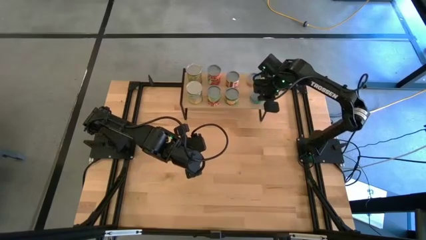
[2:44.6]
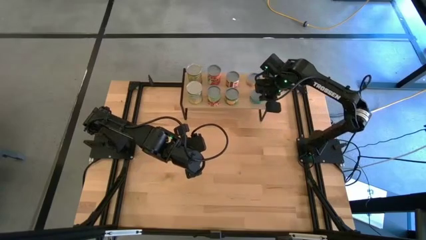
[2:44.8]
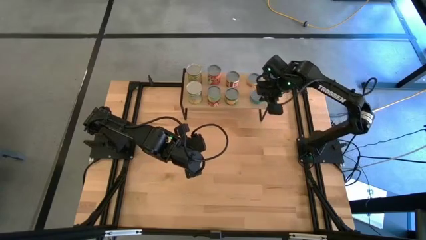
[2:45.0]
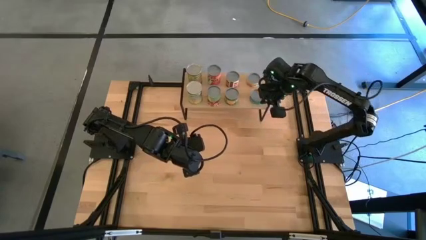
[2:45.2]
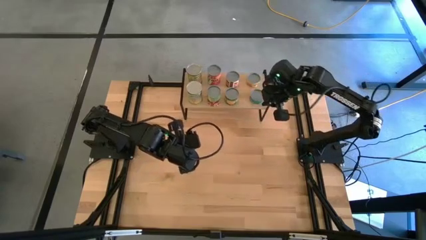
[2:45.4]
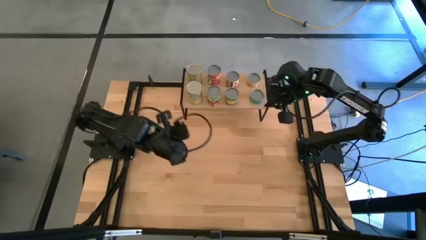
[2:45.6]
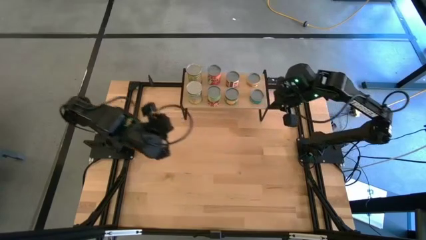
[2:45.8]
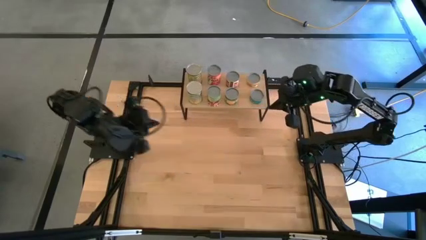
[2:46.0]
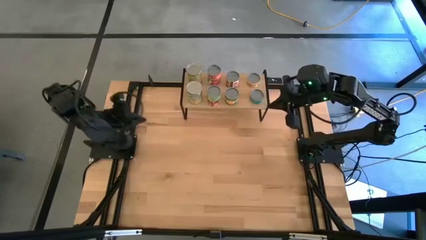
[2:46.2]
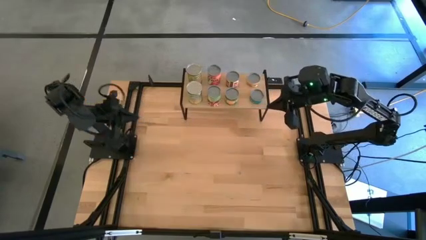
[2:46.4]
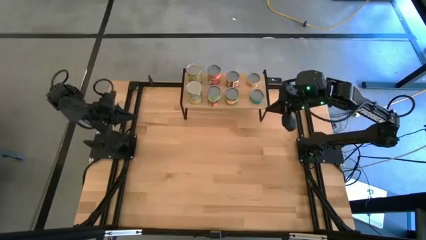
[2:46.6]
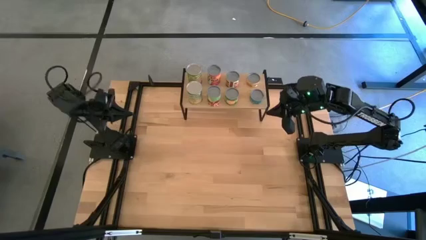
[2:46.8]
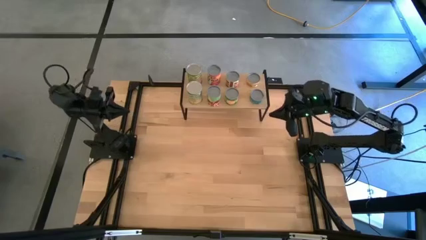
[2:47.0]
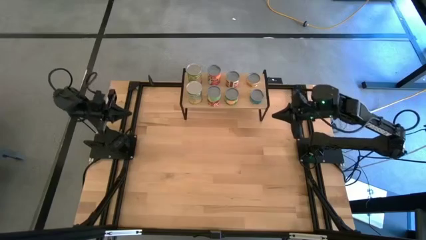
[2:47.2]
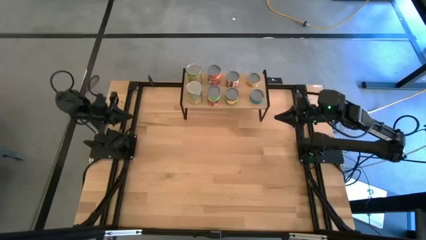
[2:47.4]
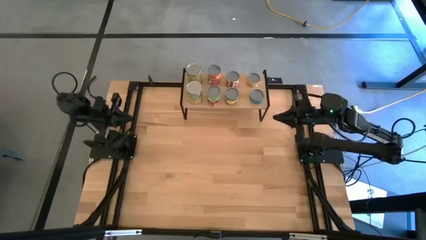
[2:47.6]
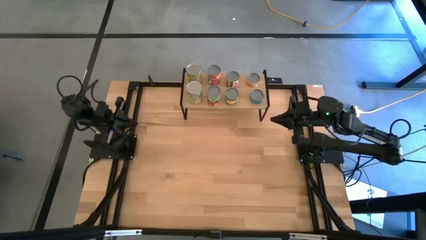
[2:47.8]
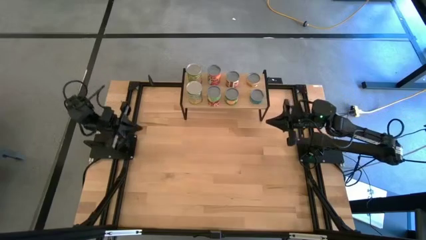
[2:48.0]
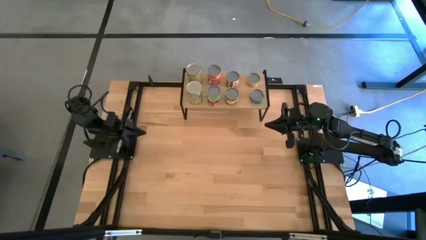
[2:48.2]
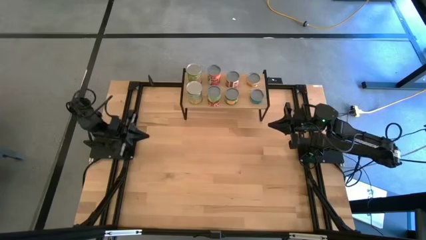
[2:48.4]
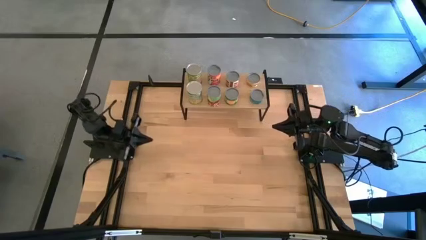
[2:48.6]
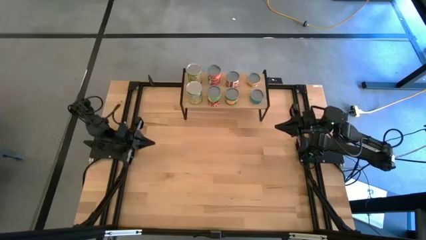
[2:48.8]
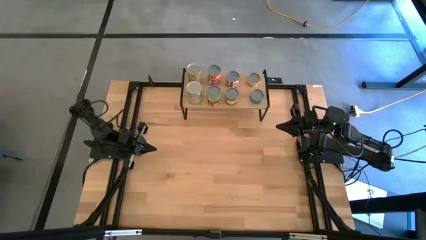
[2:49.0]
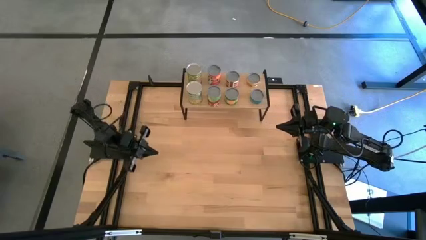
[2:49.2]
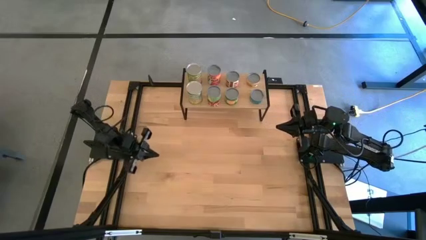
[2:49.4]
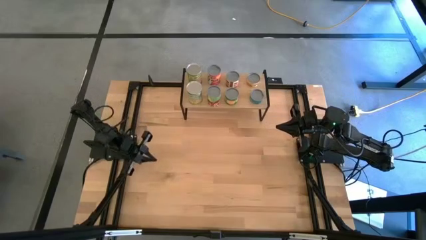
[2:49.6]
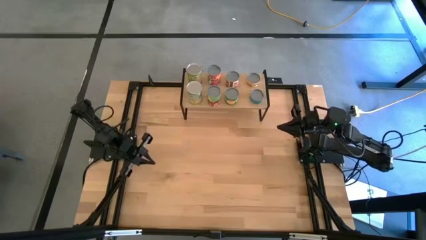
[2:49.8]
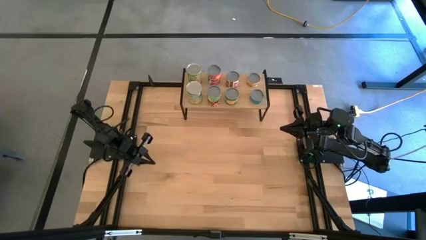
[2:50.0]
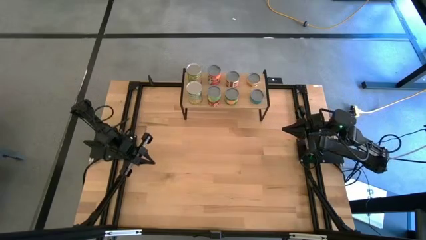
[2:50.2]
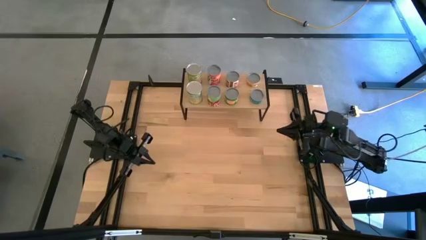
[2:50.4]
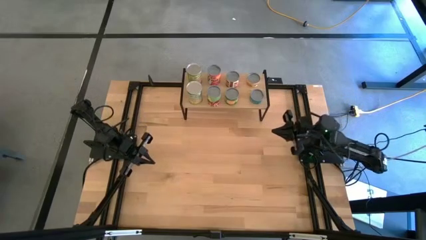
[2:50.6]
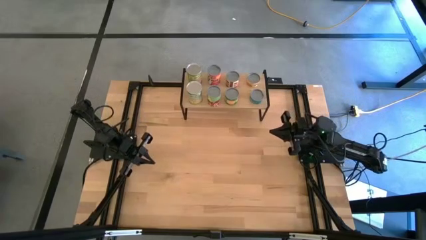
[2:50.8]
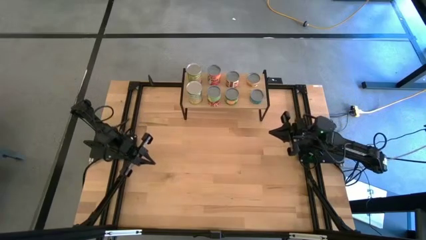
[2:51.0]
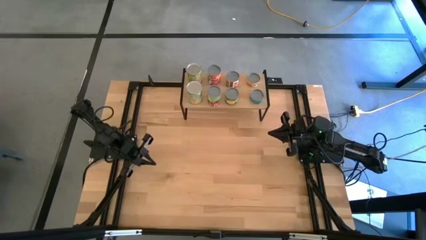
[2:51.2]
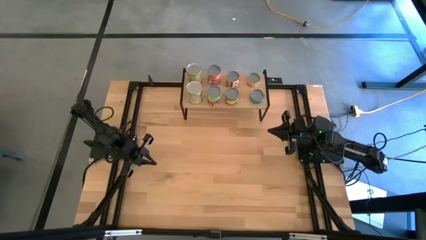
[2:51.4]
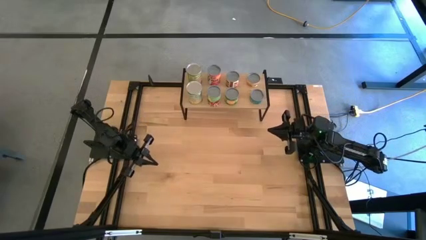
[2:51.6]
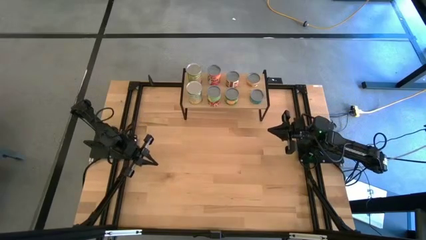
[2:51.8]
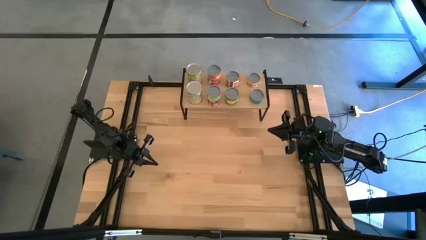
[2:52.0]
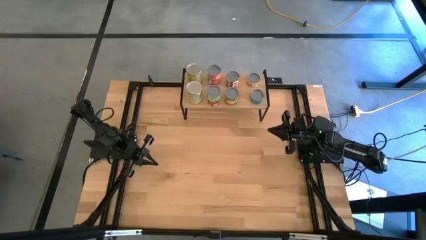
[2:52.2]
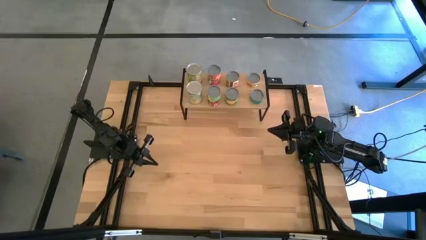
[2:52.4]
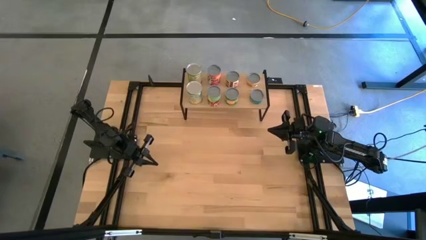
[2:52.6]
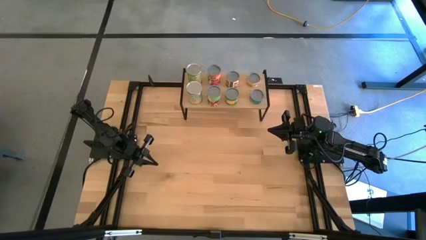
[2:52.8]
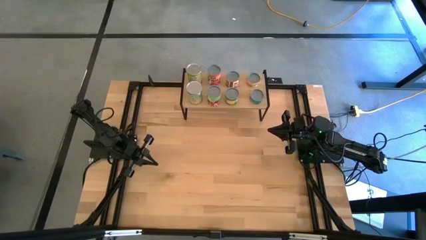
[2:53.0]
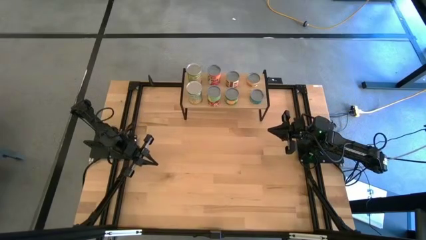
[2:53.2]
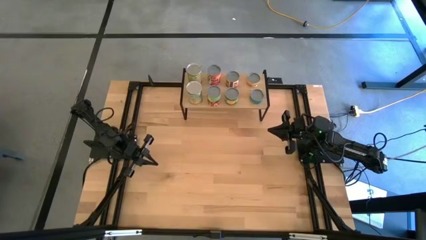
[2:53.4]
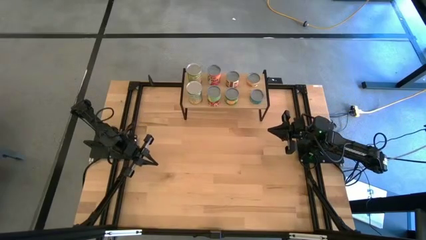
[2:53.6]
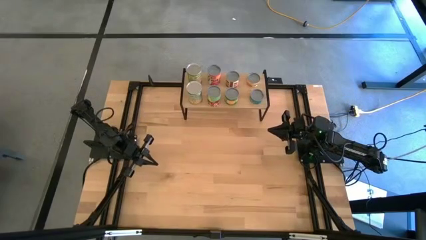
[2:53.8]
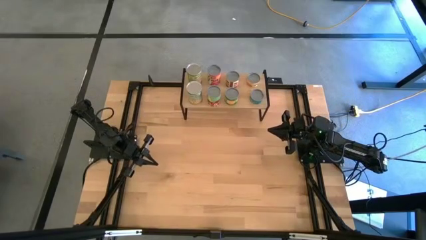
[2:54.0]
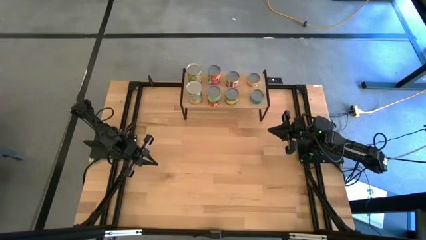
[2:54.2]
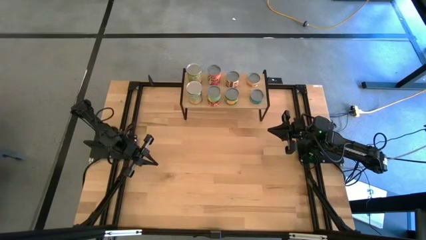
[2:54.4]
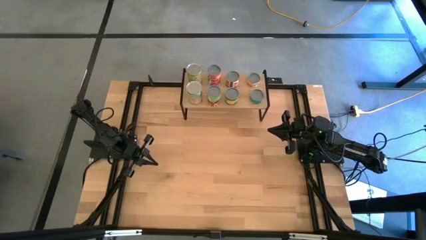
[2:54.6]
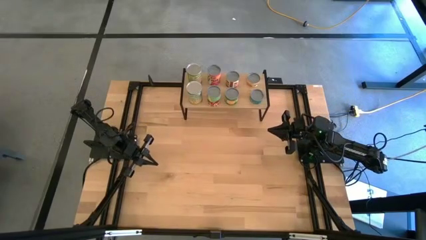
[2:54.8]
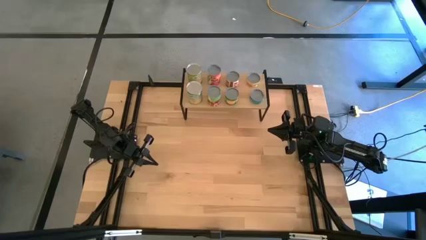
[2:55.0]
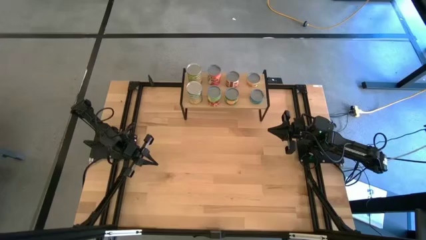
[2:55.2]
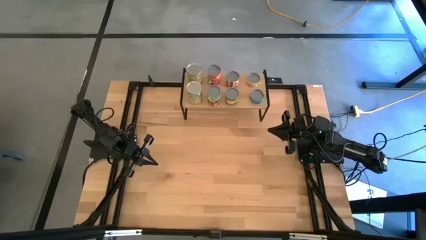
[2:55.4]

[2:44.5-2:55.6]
Task: Pick and place cans onto a shelf
Return to Home Position

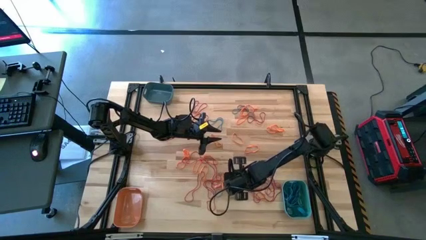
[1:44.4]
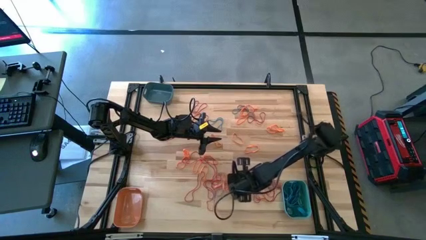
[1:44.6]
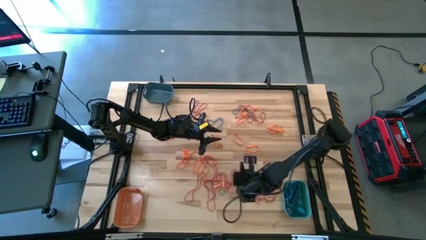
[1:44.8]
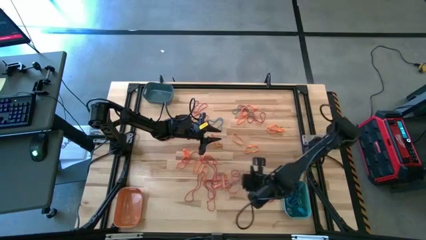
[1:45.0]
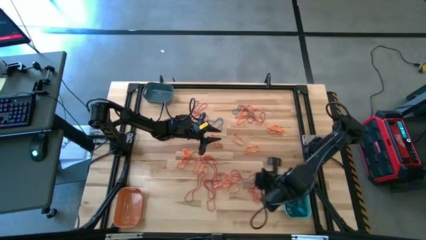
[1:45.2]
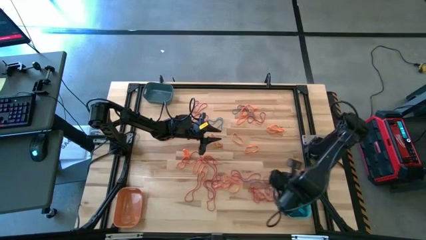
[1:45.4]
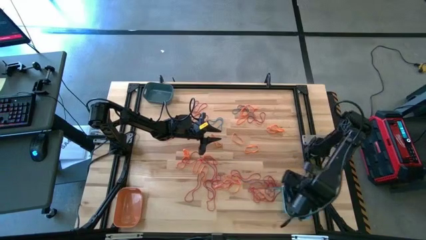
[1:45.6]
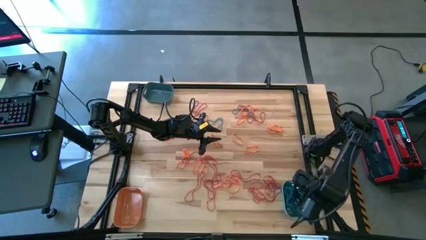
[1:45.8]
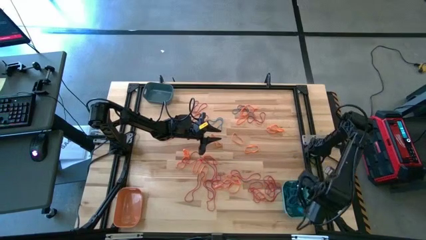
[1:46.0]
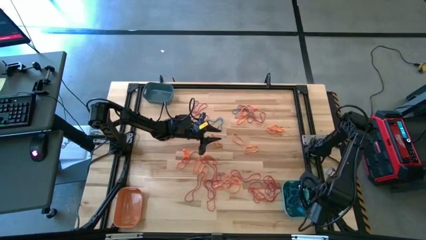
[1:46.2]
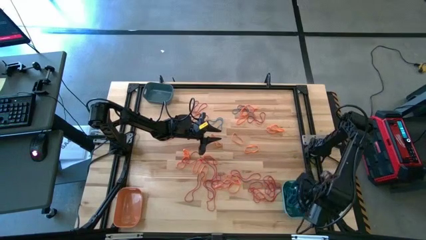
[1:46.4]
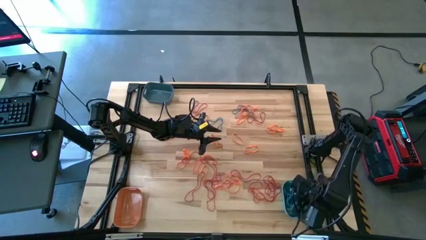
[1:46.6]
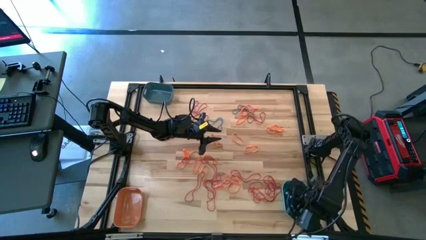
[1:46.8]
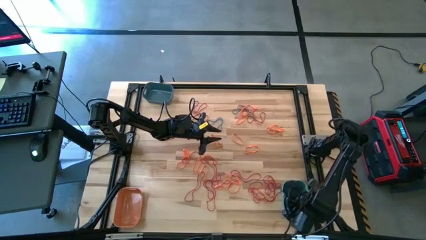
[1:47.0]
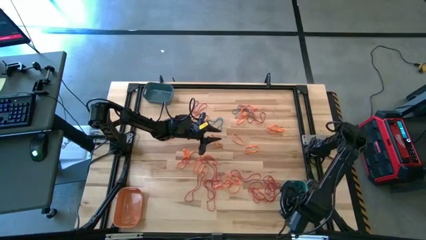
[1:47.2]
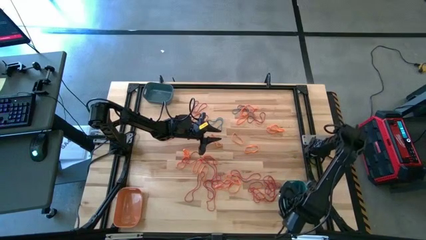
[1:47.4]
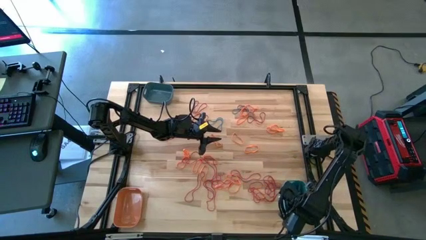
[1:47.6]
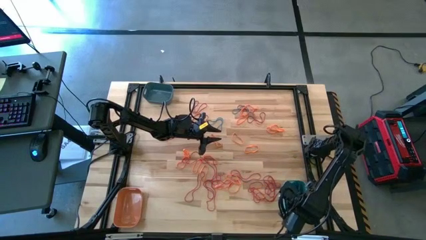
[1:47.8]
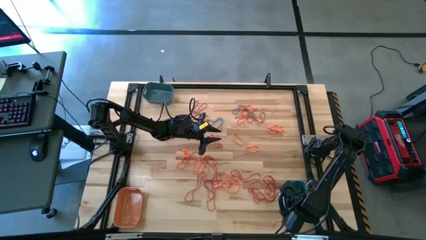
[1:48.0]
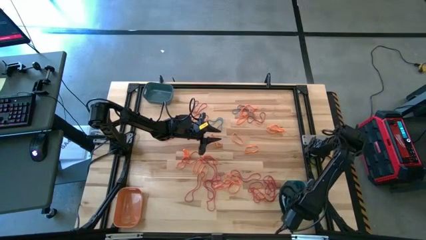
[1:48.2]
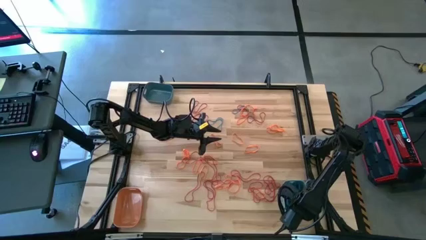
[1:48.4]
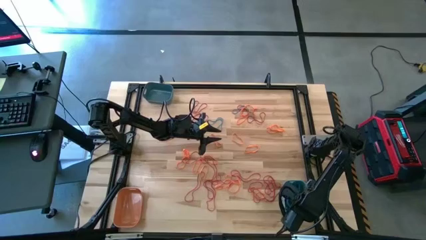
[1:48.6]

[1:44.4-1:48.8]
Task: Sort rubber bands into baskets
Put the blue rubber band into the light blue bin
